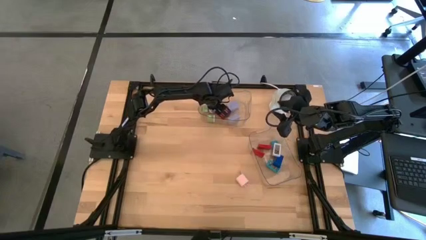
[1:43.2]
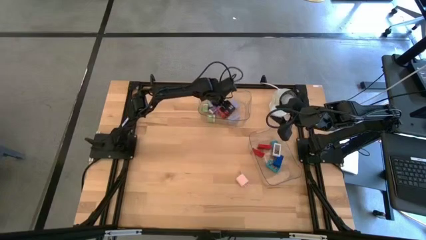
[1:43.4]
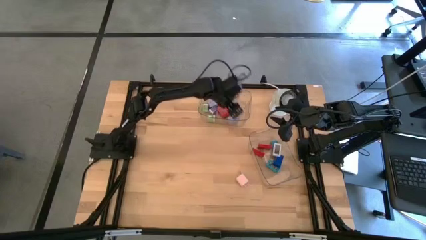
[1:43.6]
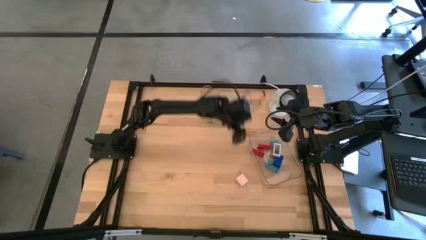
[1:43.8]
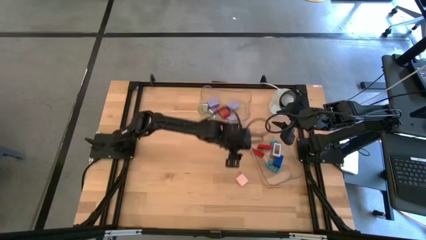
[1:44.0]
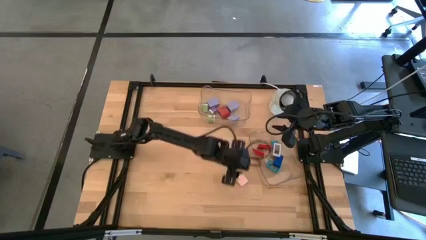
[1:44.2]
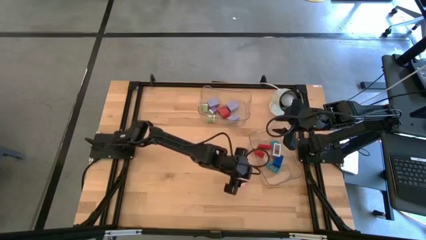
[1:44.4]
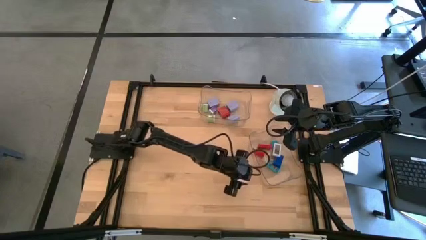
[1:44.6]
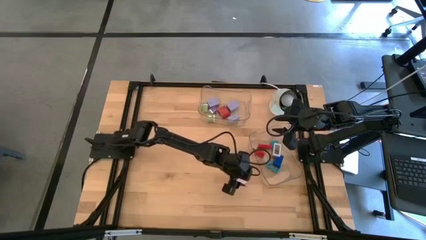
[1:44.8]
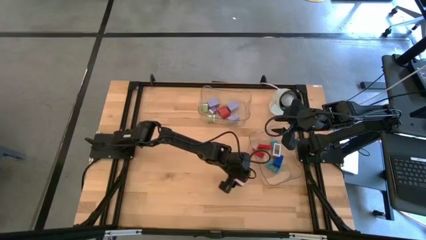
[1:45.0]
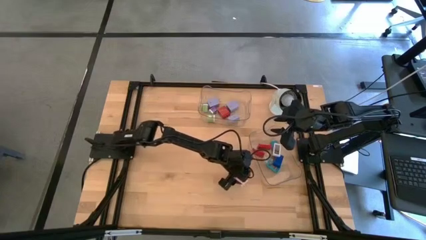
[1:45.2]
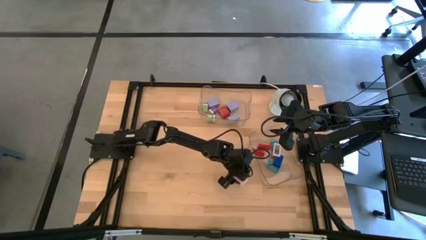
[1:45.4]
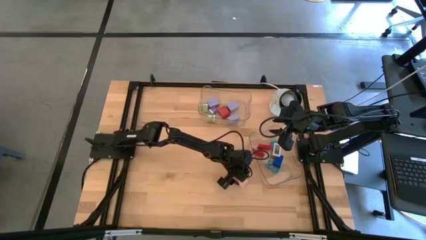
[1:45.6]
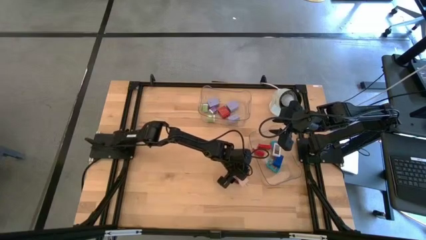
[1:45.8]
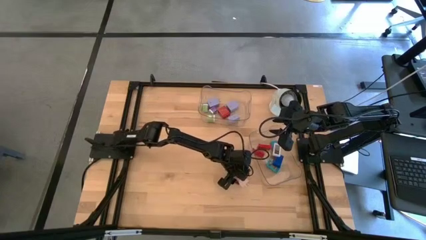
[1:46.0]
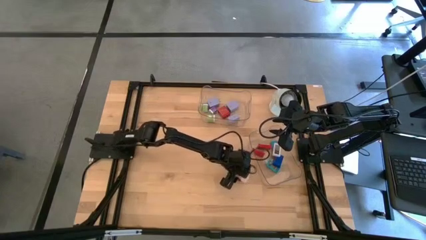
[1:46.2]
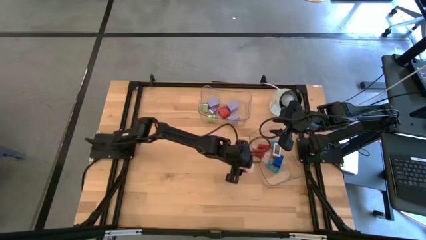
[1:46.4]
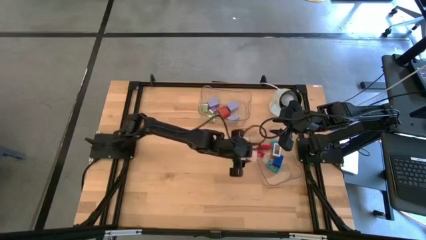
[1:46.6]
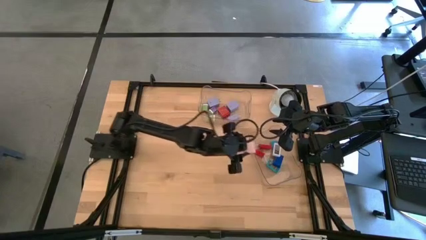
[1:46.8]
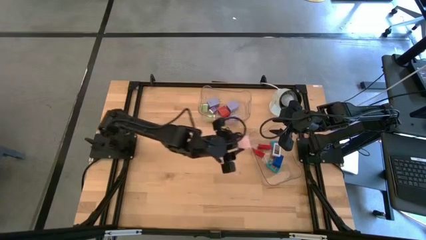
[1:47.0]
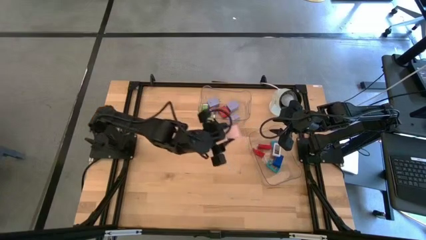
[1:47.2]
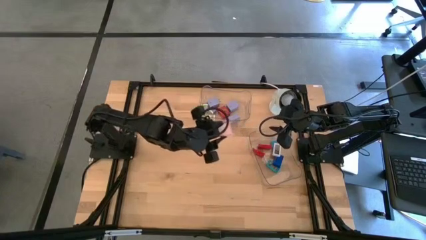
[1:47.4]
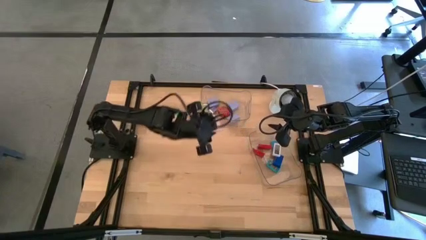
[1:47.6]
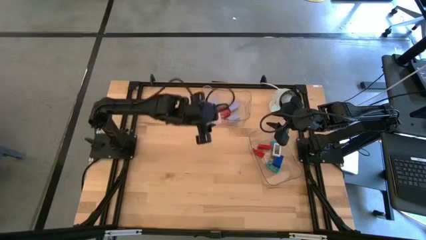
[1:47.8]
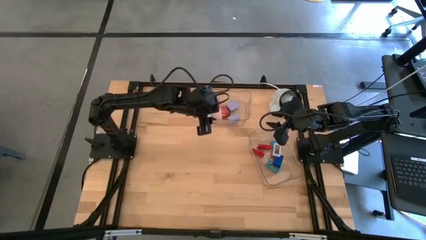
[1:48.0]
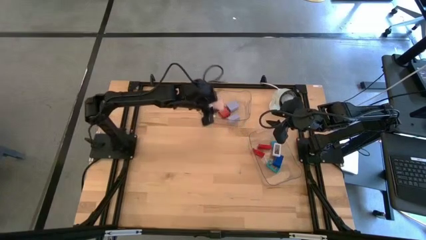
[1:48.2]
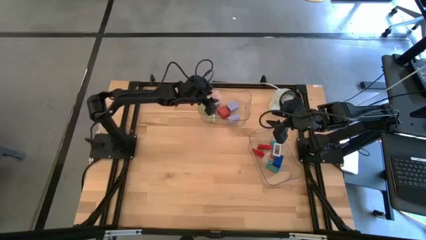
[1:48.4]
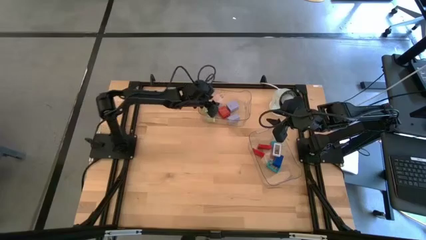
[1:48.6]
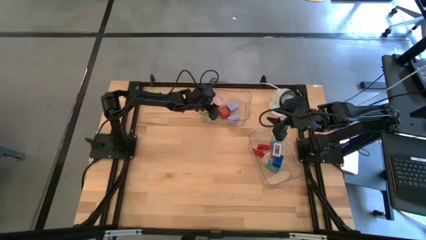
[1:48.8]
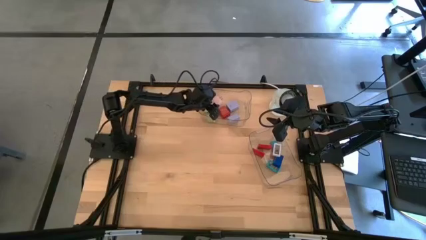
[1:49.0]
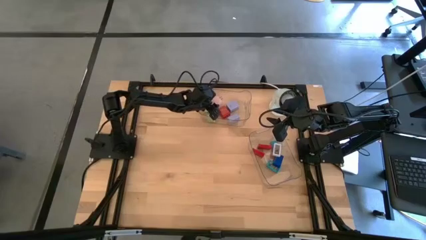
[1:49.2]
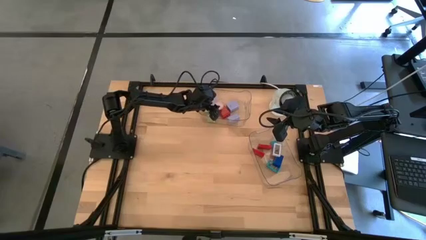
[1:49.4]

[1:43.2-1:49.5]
Task: Pick & Place Office items
Put the large pink charger adapter into the top transparent bin

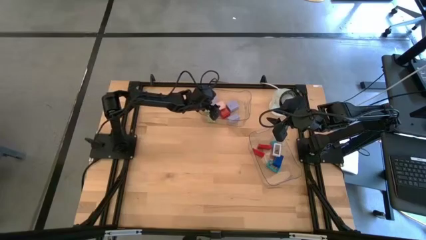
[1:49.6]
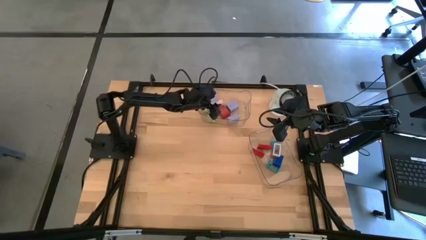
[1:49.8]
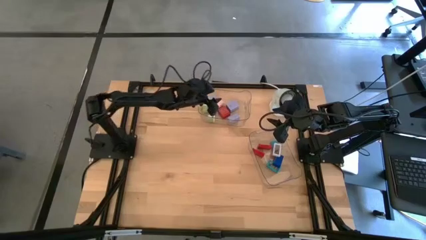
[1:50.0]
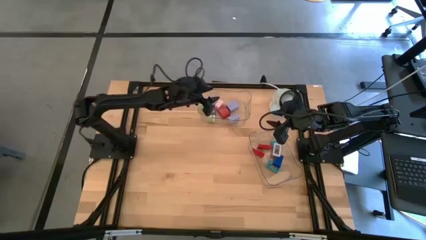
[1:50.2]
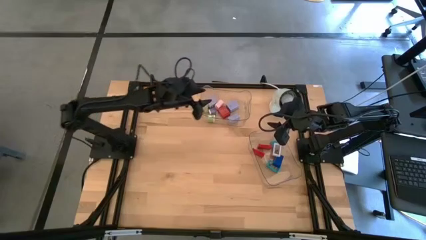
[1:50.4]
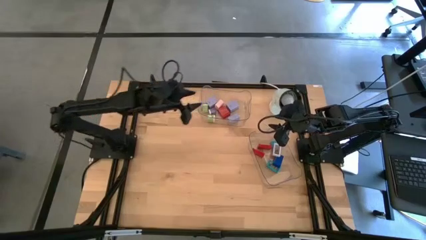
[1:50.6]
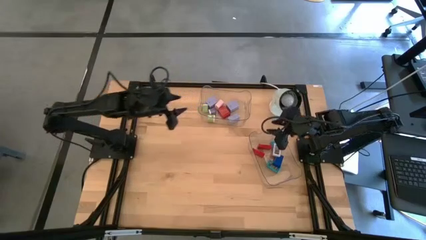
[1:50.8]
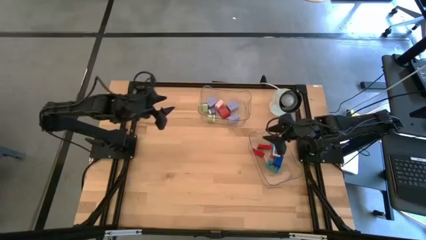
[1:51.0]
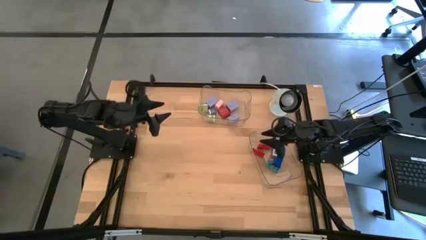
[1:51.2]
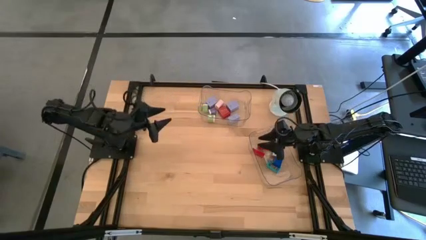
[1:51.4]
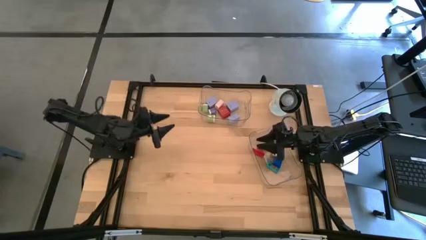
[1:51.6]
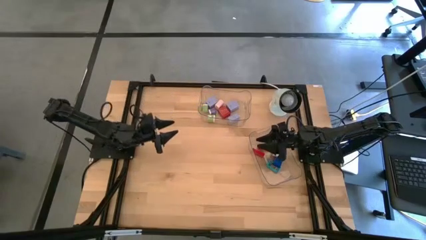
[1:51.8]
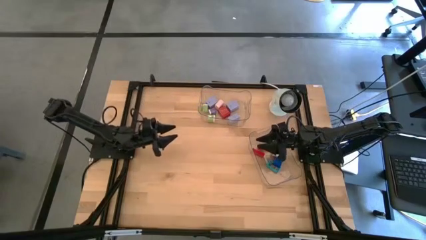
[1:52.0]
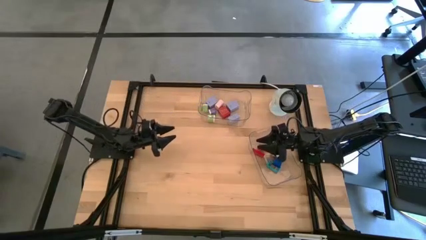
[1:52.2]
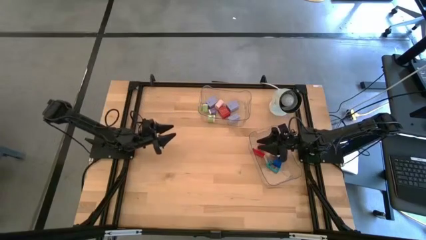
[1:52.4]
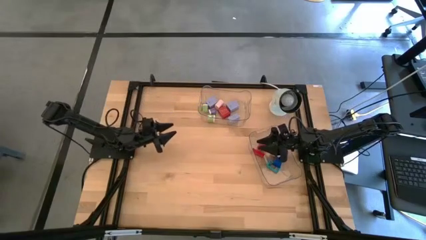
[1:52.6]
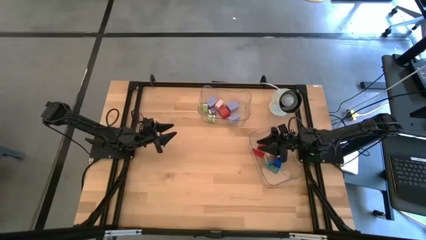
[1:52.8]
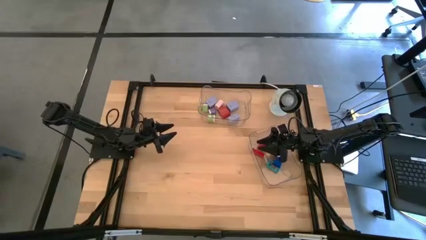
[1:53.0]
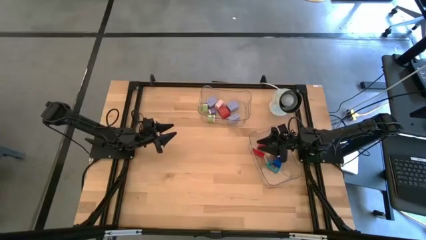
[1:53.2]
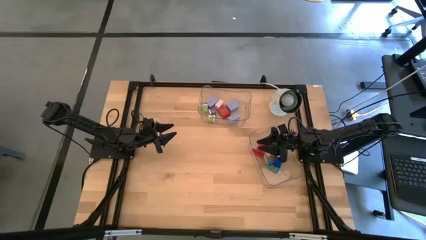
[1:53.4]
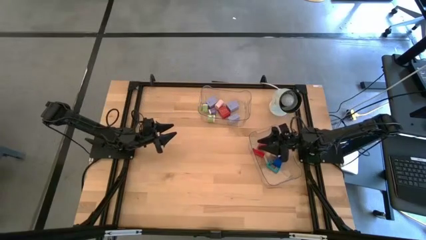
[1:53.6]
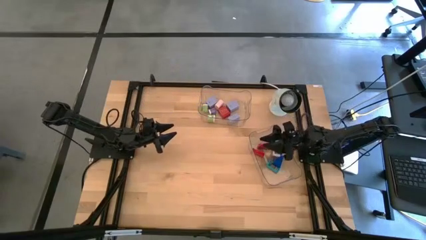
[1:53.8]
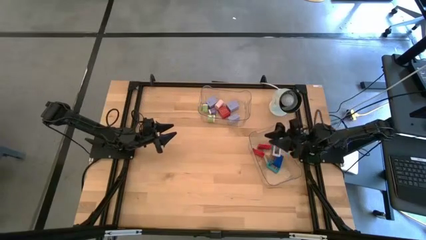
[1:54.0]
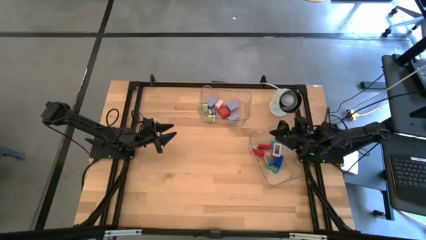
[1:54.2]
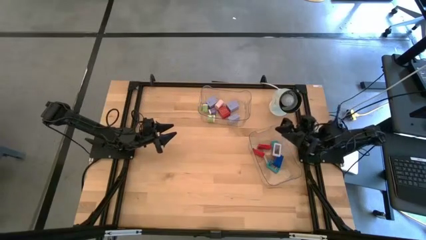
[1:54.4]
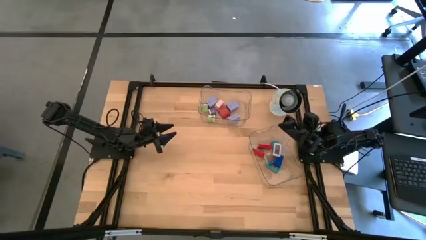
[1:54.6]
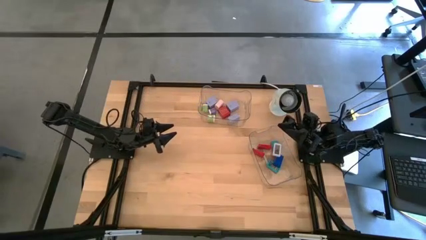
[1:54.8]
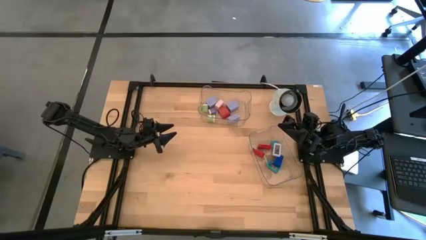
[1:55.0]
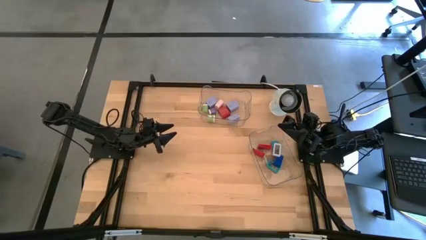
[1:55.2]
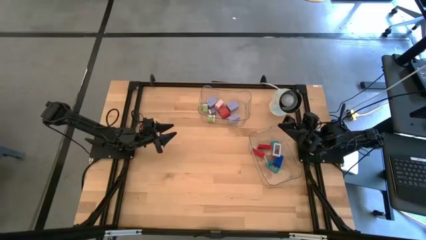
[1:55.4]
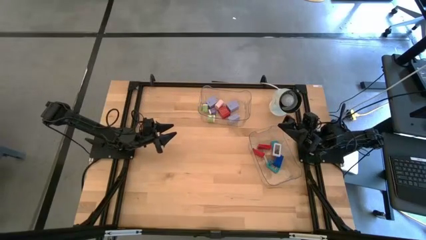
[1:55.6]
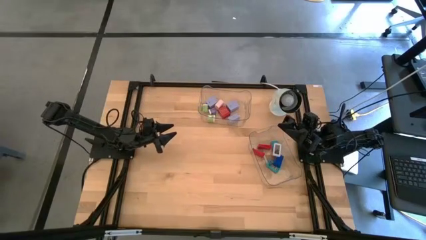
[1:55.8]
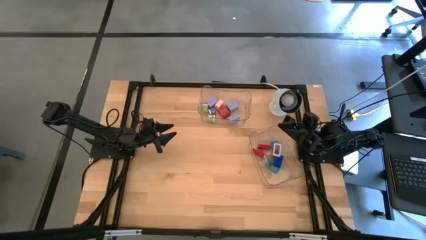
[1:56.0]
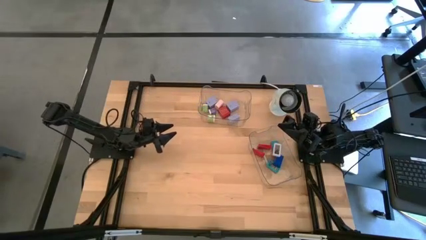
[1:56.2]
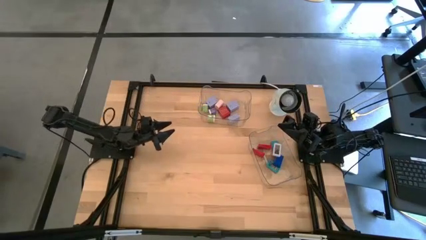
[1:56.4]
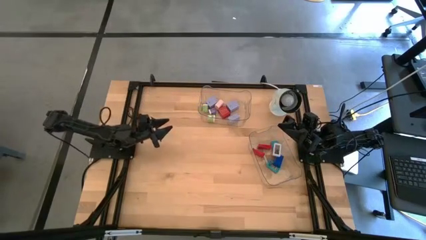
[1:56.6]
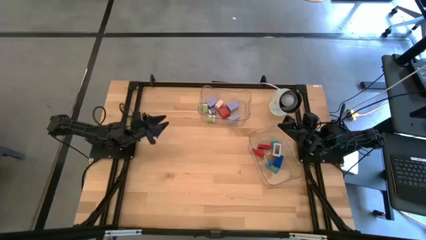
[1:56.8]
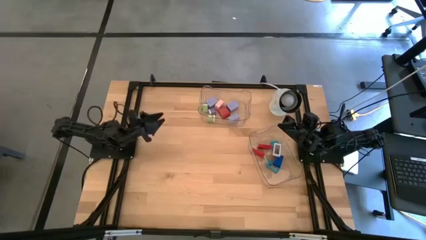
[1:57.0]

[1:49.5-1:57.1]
Return to Home Position

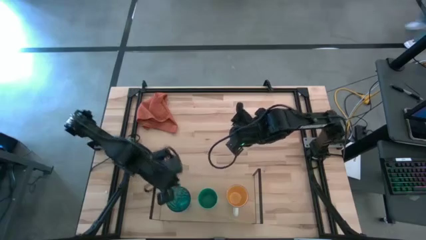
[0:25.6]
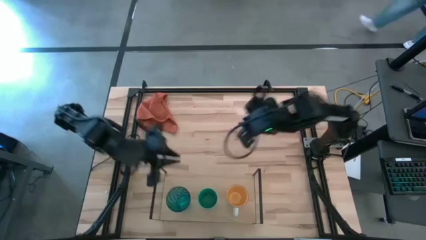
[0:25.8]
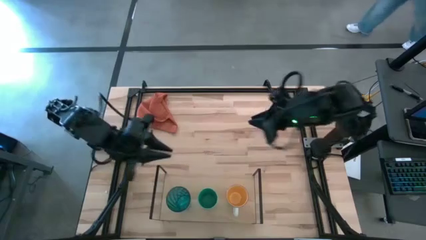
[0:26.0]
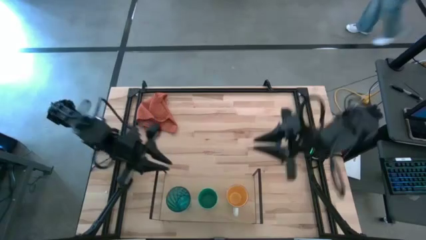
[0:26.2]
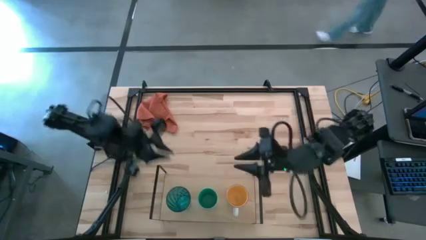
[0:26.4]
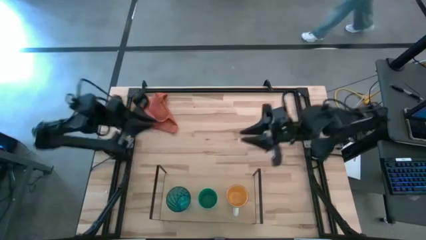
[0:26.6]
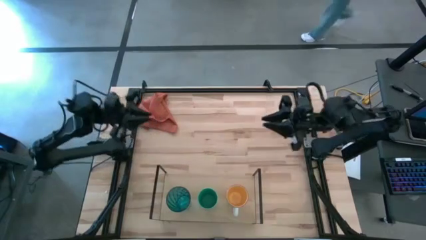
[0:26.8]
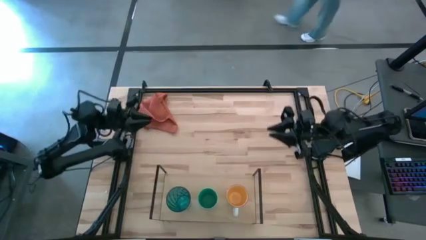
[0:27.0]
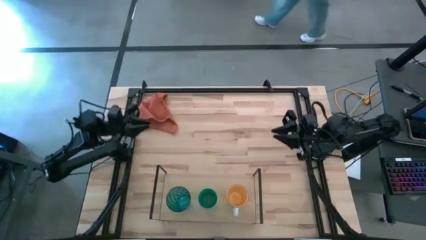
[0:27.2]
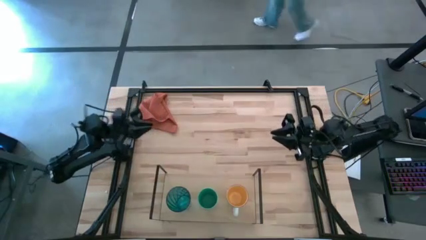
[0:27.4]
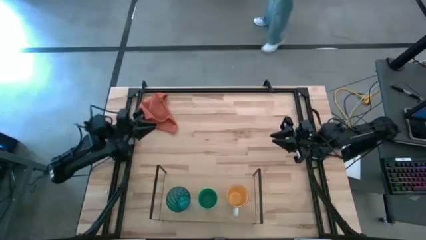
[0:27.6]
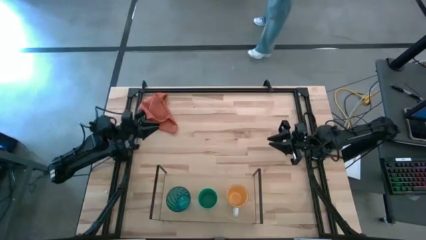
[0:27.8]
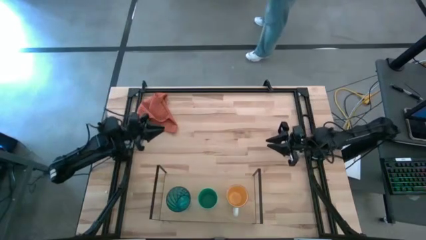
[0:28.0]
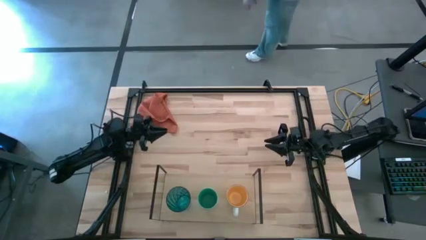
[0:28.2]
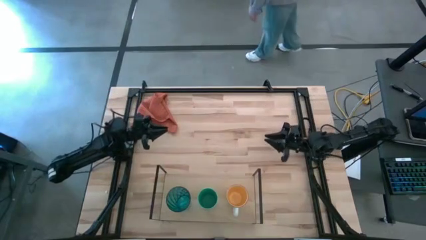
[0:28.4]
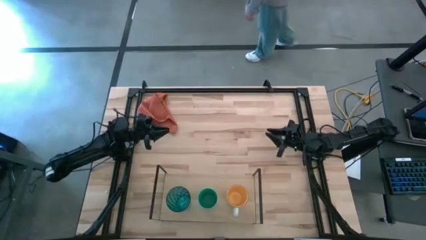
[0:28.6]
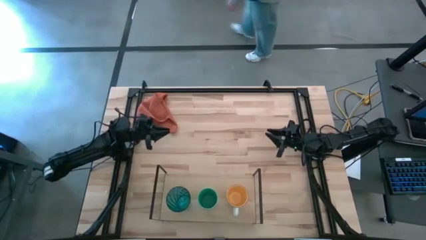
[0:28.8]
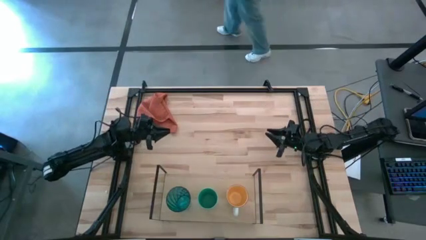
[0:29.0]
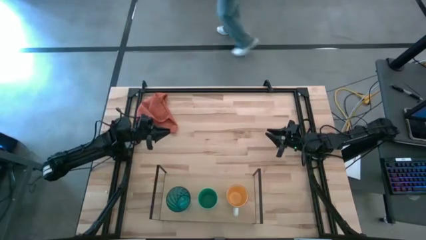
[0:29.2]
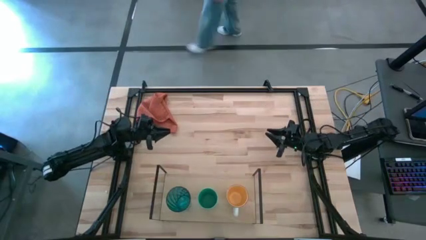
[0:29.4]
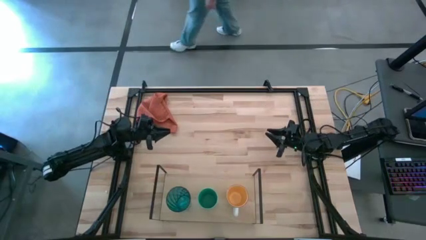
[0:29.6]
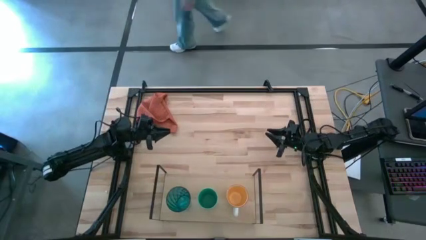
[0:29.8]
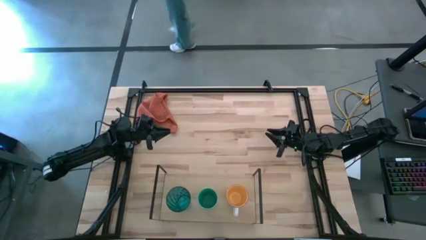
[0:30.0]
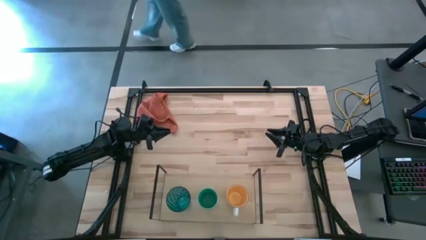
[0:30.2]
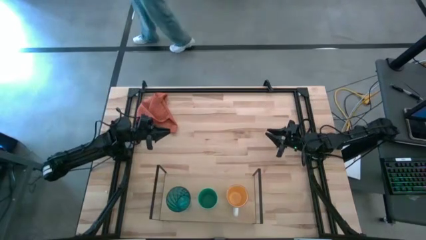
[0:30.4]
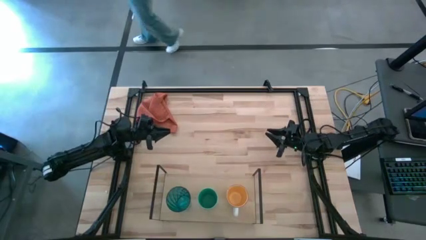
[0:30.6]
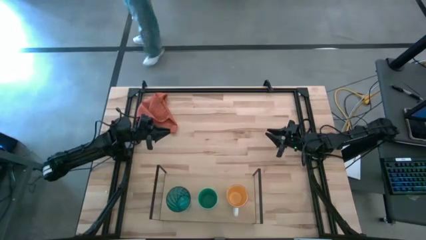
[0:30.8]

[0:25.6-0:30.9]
Task: Stack small to large cups/mugs on shelf
Return to Home Position
